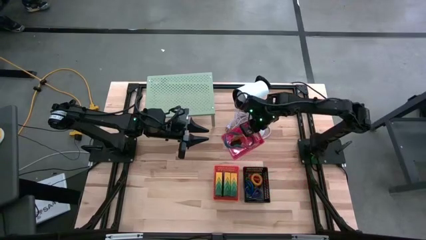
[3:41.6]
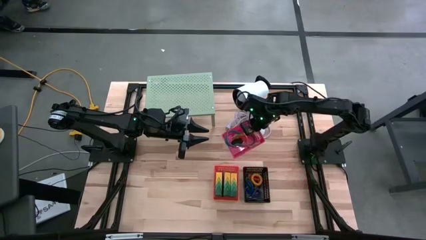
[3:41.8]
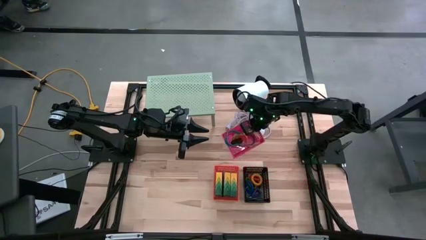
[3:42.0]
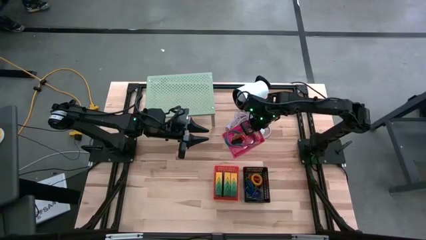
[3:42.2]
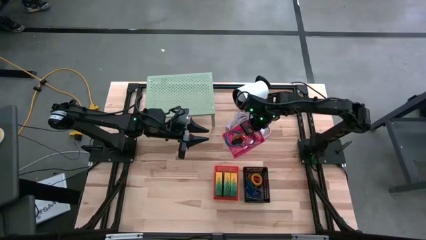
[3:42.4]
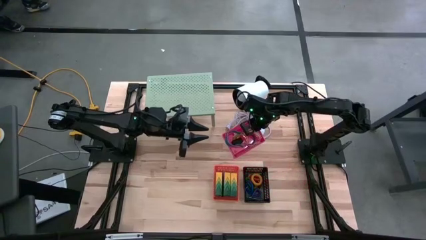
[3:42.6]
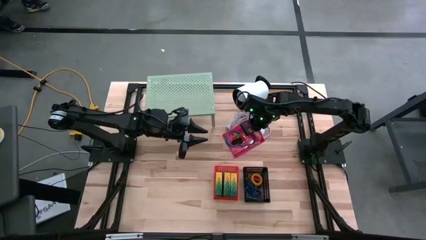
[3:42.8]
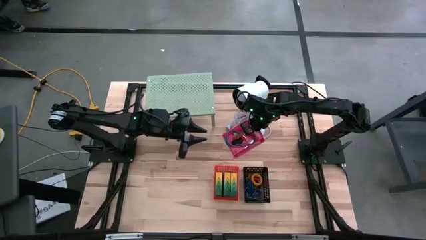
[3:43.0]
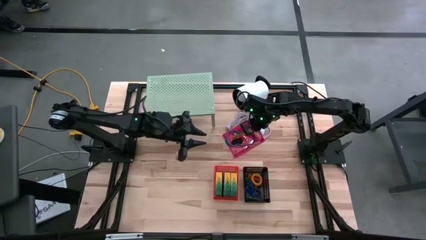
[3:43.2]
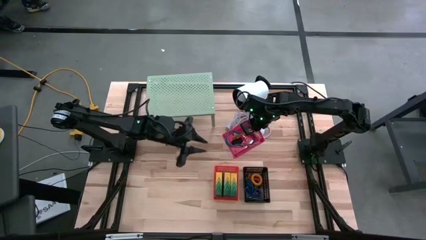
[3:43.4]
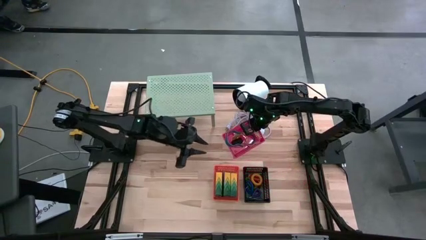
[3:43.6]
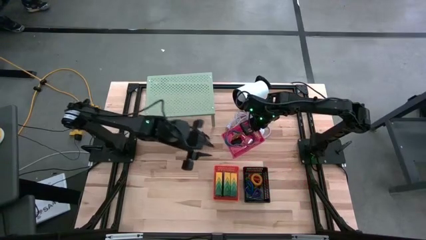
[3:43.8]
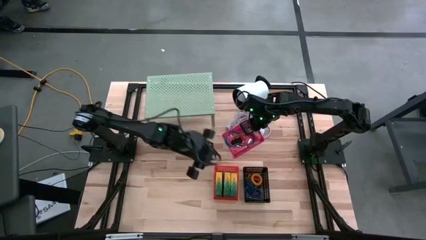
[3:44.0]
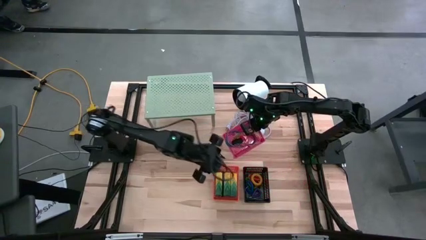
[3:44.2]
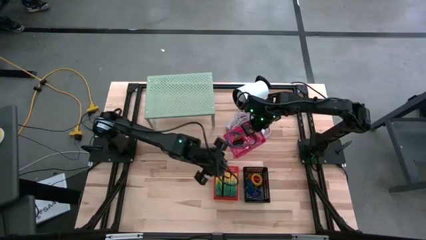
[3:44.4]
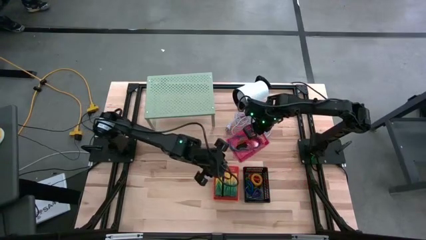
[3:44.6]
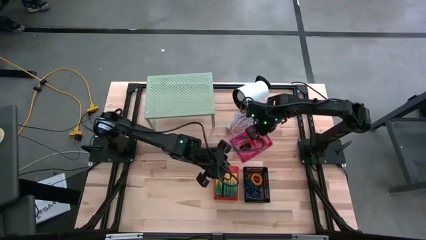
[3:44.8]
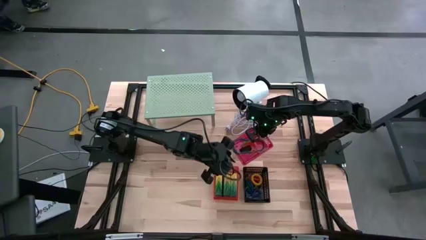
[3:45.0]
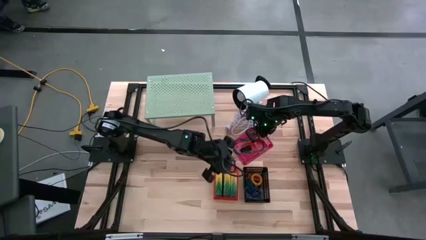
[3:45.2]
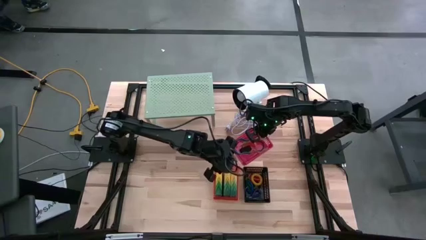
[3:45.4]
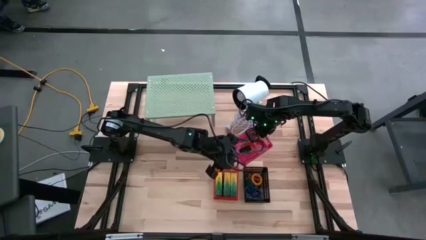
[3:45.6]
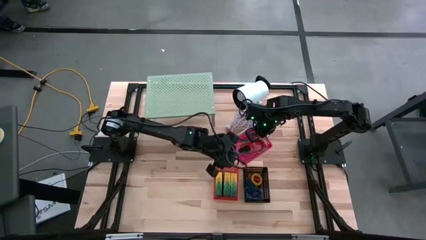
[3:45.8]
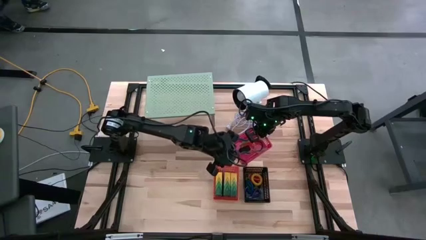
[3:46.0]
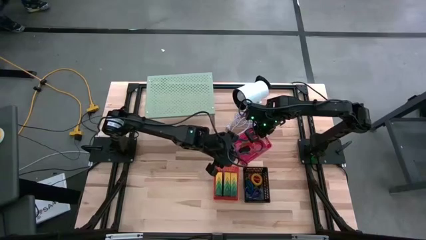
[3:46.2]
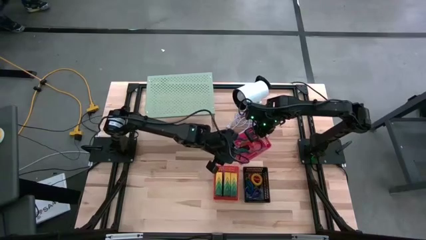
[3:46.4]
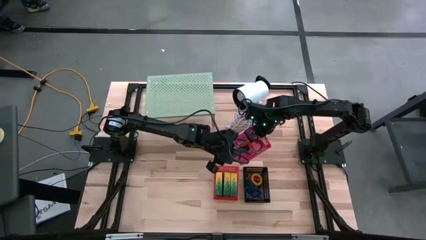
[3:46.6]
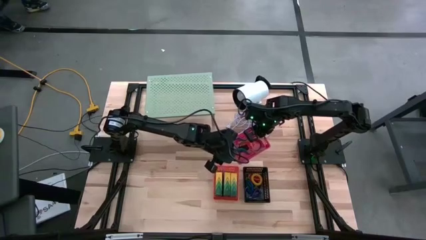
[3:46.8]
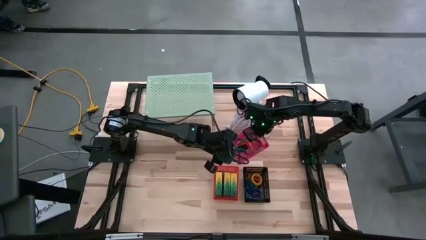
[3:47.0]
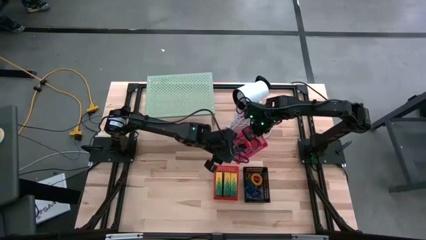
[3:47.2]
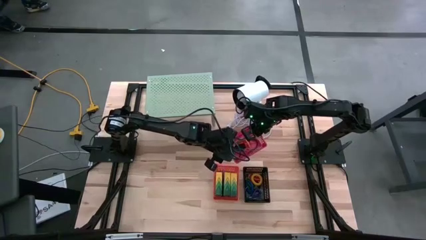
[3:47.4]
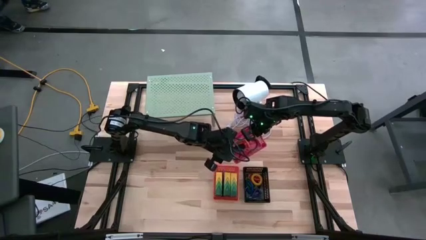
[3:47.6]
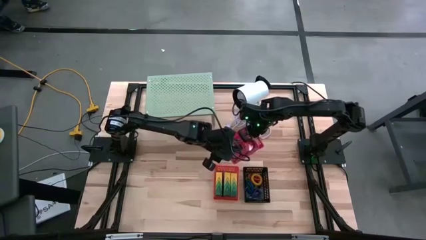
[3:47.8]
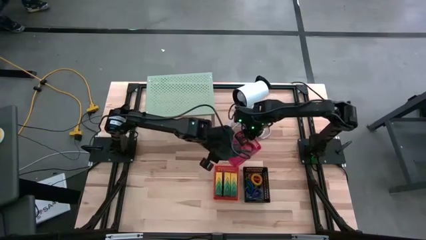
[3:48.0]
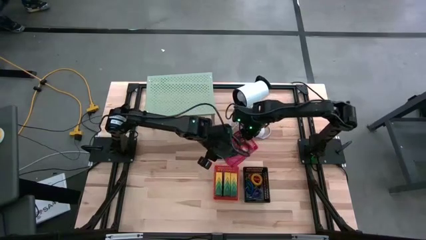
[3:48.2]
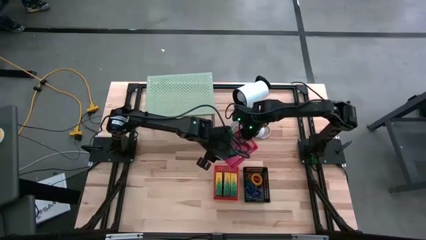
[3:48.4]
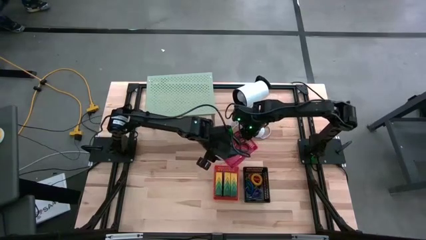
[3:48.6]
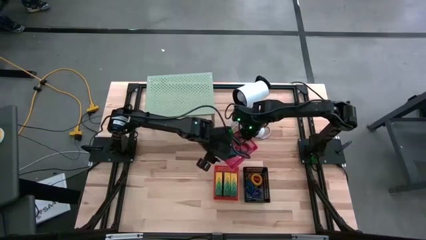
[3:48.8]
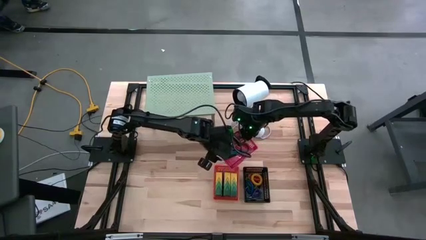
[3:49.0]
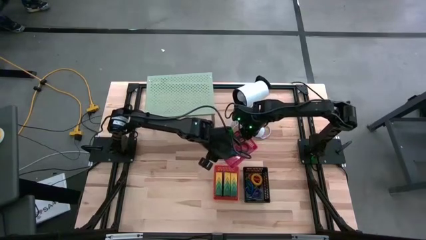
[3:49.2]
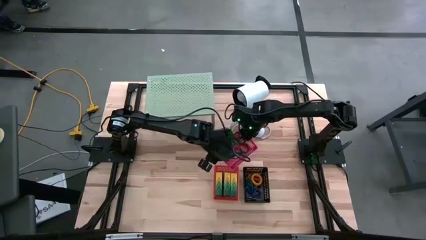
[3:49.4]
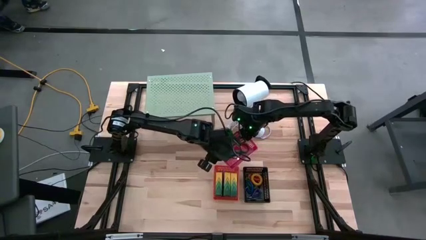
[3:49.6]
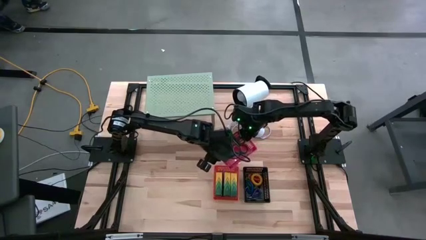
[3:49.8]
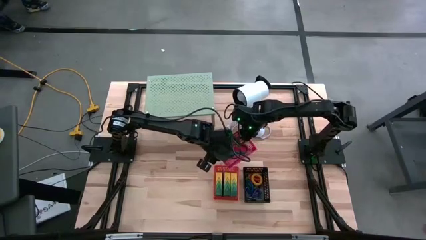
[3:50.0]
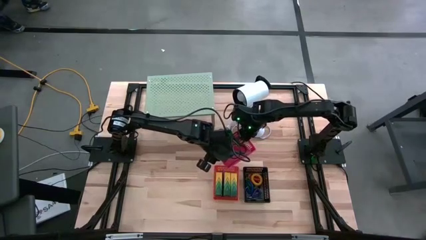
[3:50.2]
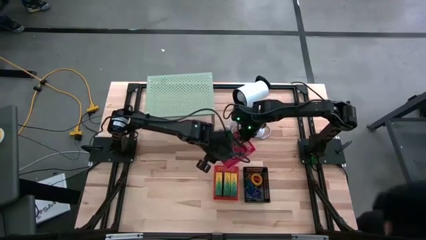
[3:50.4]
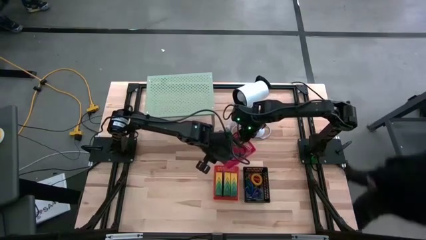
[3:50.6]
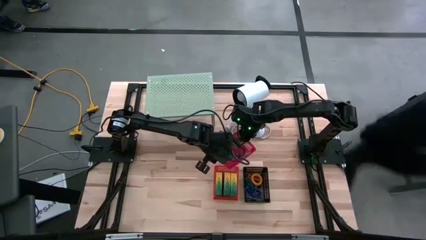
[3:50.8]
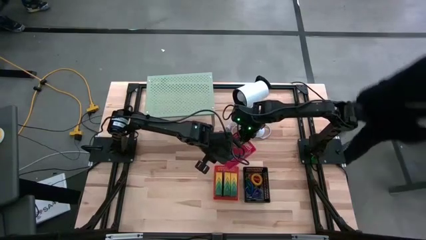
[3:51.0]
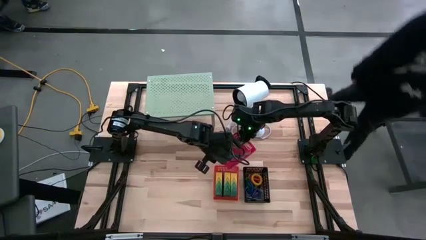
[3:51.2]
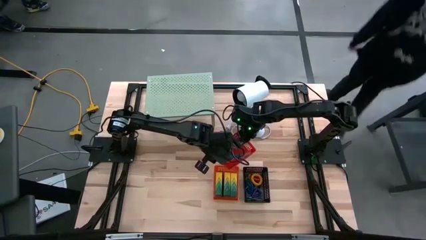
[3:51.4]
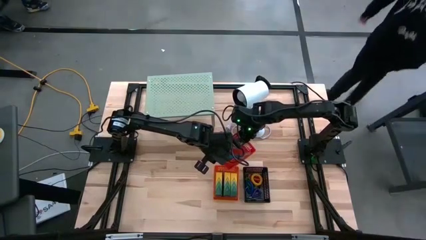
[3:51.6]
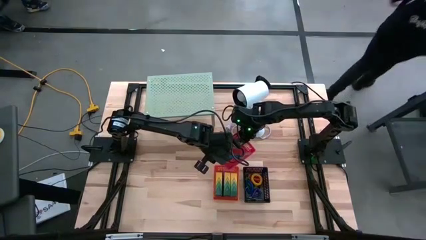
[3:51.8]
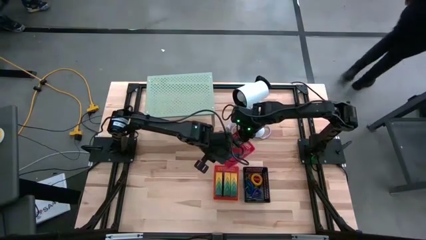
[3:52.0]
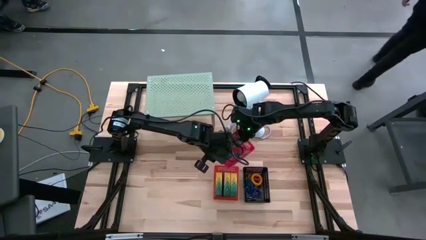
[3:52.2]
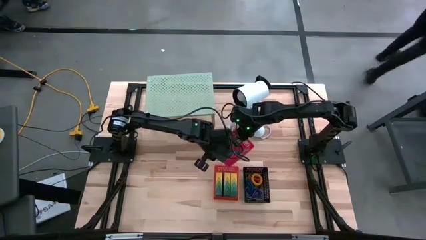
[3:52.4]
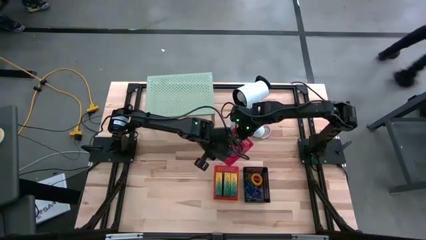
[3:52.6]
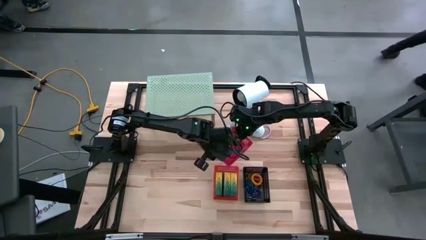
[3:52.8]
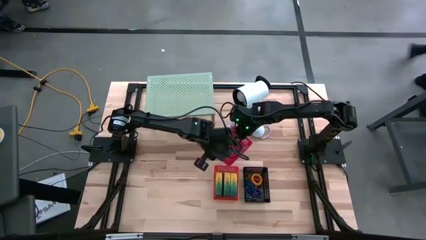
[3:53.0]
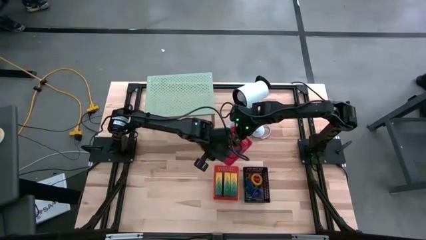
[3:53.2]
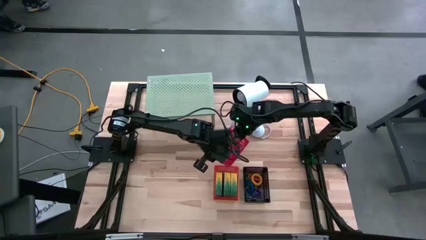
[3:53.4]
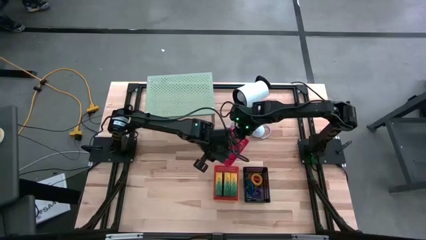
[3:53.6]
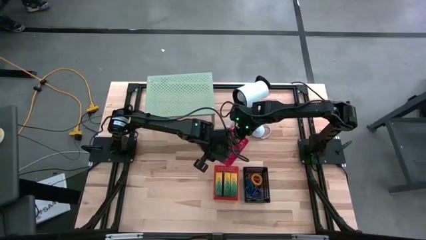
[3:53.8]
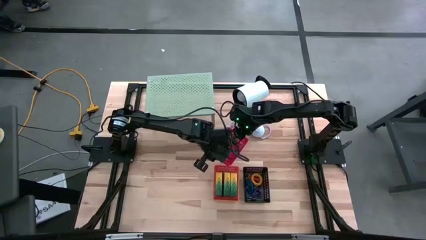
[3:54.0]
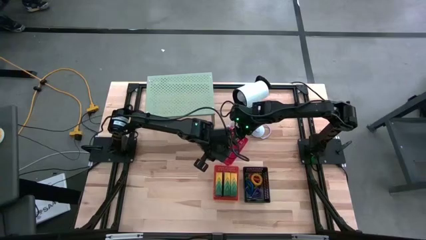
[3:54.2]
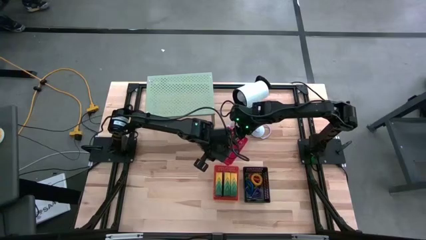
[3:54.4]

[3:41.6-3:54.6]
Task: Pick & Place Office Desk Supplies
Put the red basket on the shelf

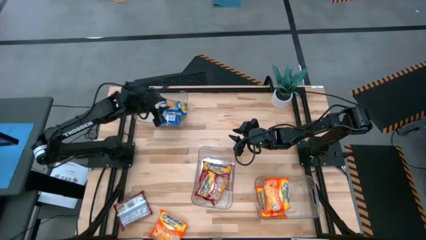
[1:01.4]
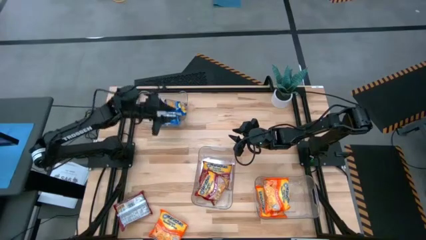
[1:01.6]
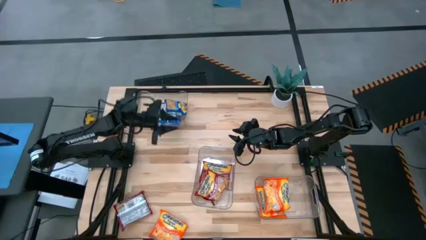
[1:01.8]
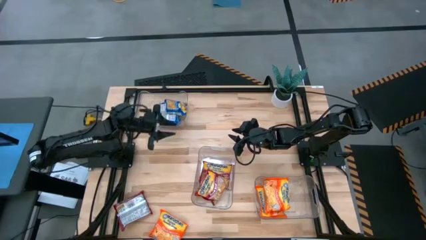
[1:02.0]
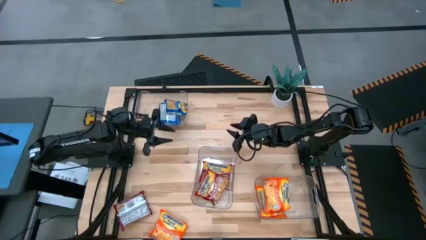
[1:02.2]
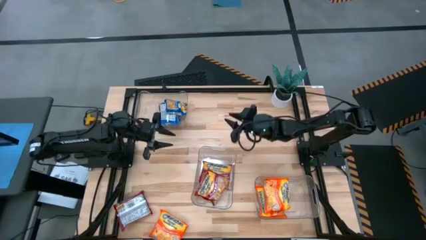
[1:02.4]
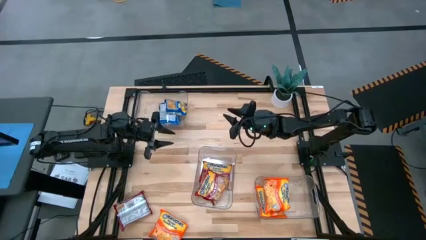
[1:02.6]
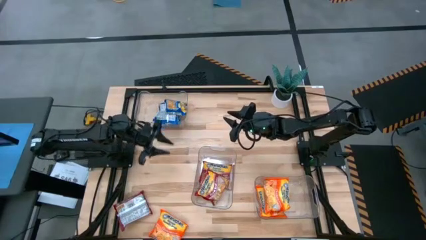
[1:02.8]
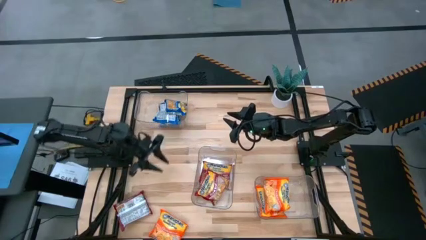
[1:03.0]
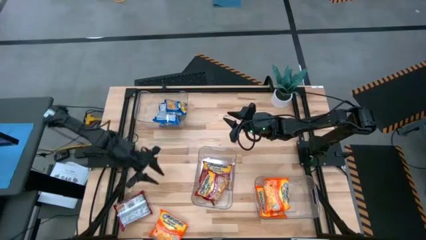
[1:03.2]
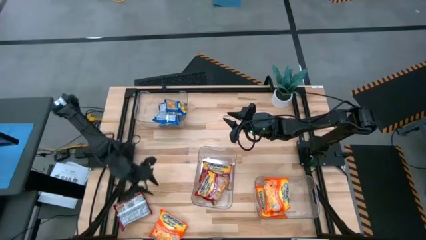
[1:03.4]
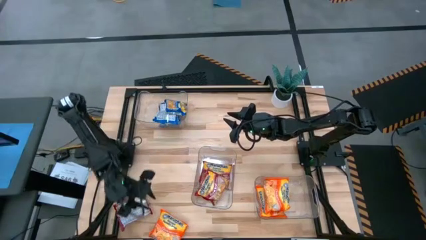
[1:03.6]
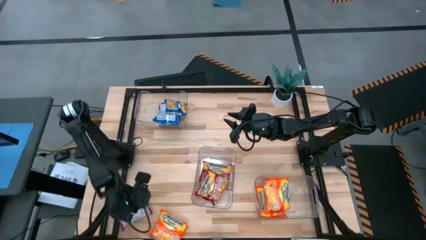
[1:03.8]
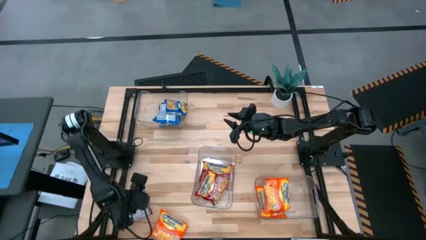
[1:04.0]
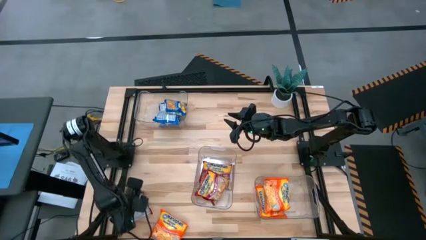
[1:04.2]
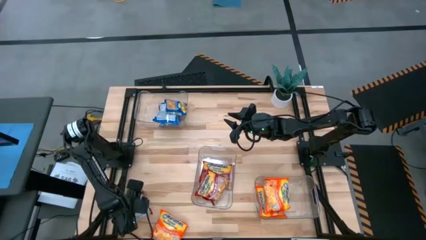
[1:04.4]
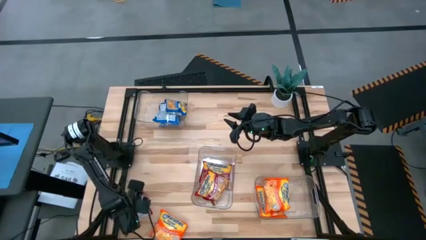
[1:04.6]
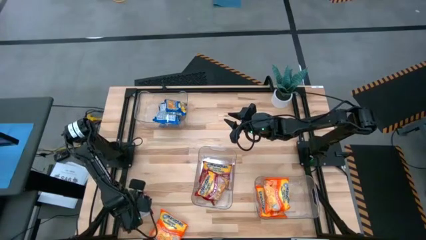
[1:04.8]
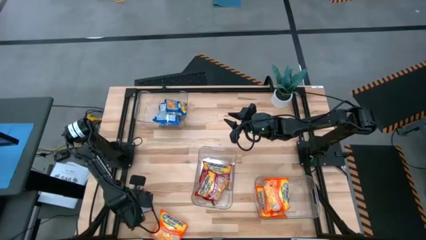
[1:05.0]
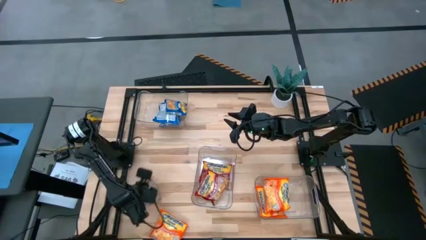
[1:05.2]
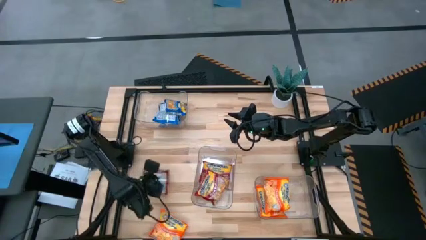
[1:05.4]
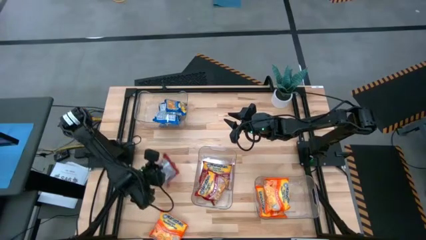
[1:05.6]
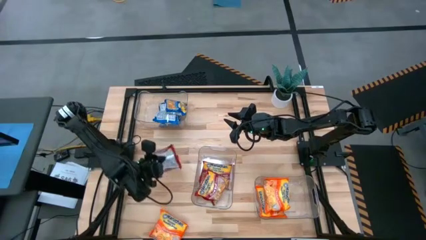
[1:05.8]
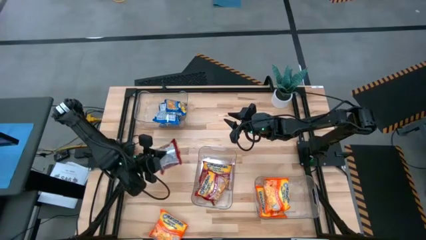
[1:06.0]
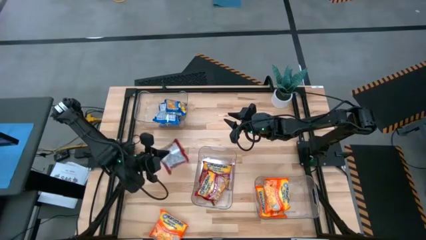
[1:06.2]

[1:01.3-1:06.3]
Task: Sort Maruchan noodles
Put the red noodle pack into the middle transparent bin
